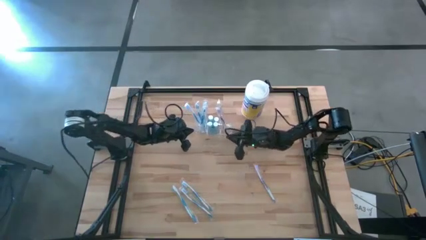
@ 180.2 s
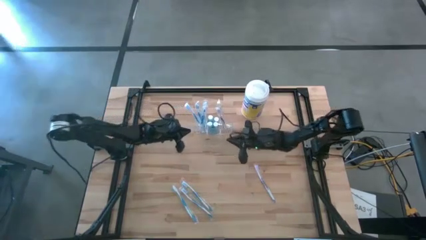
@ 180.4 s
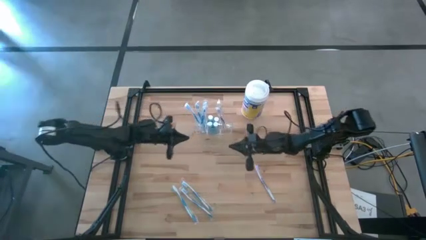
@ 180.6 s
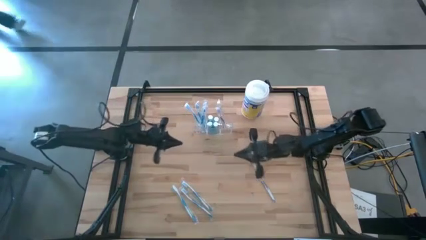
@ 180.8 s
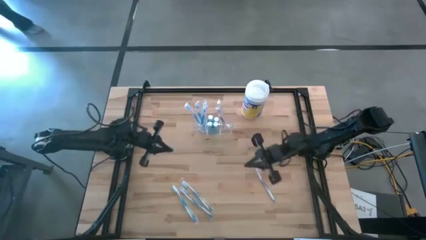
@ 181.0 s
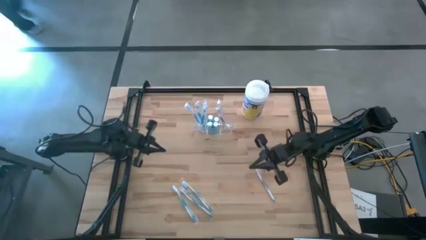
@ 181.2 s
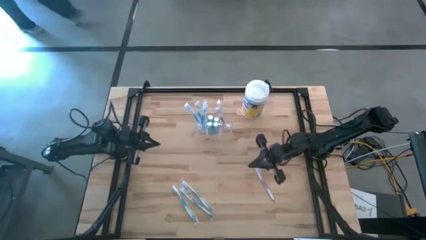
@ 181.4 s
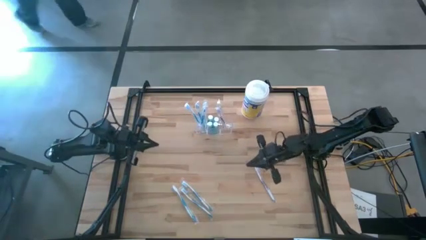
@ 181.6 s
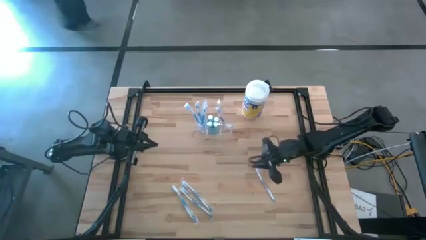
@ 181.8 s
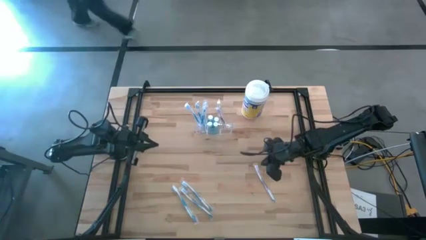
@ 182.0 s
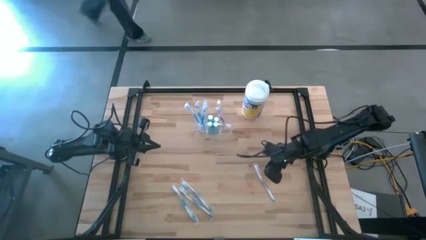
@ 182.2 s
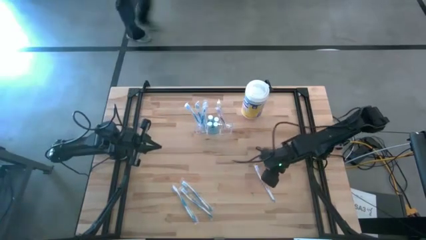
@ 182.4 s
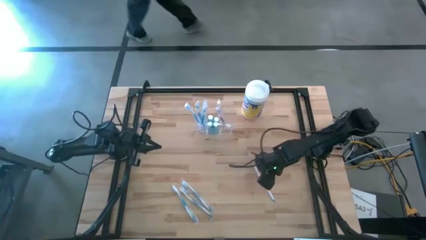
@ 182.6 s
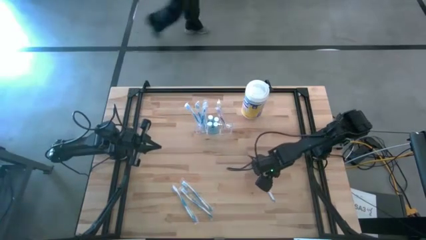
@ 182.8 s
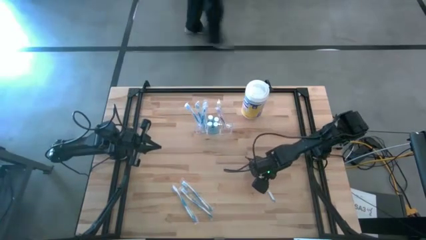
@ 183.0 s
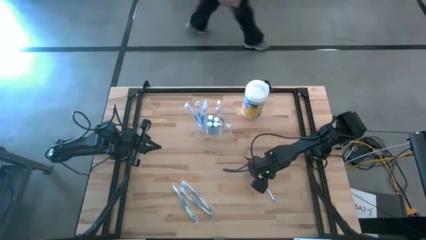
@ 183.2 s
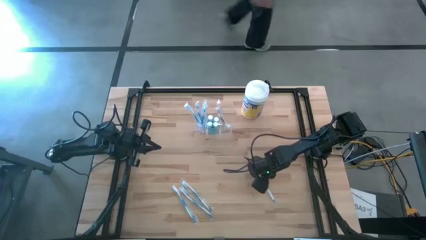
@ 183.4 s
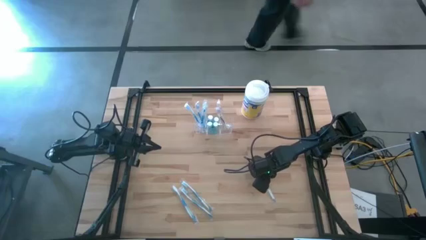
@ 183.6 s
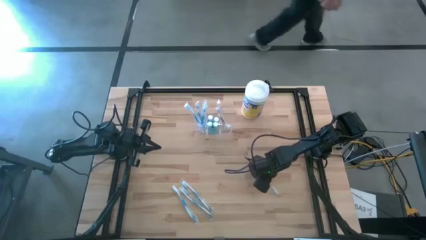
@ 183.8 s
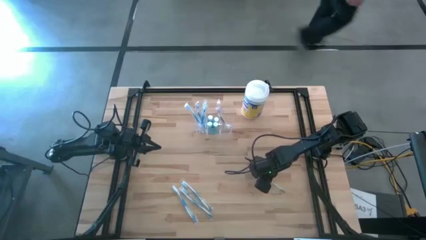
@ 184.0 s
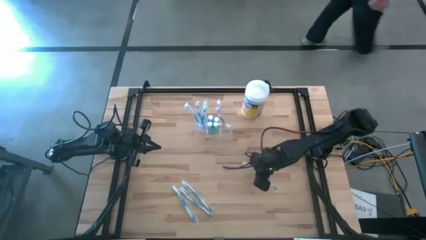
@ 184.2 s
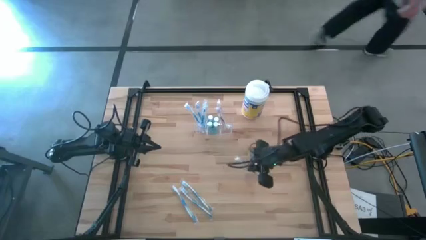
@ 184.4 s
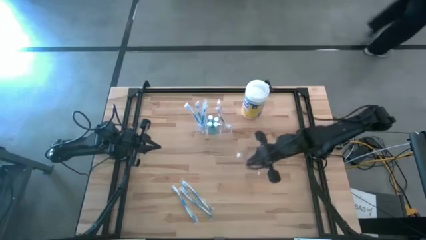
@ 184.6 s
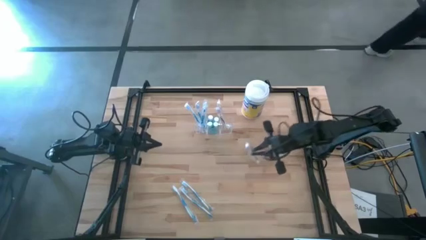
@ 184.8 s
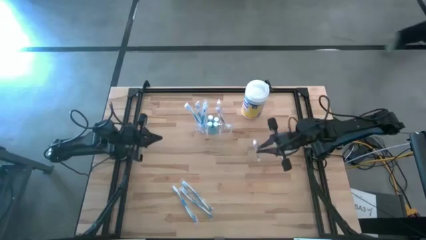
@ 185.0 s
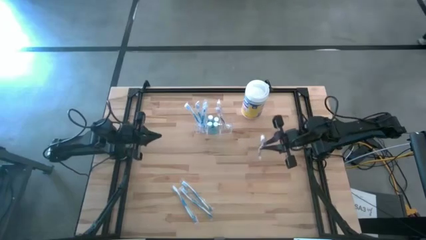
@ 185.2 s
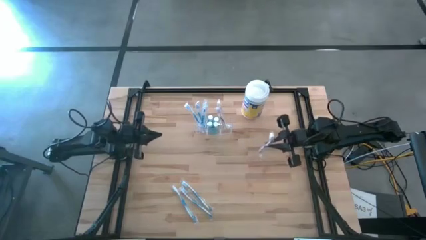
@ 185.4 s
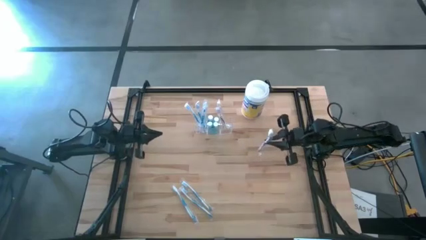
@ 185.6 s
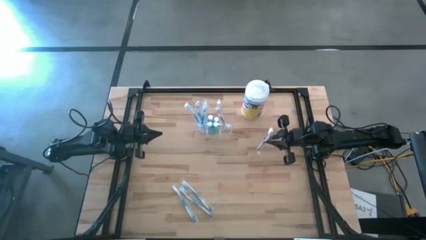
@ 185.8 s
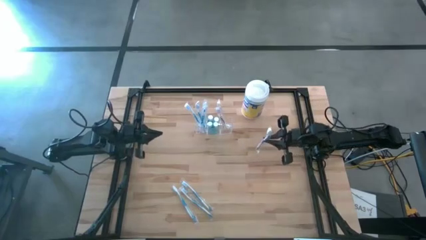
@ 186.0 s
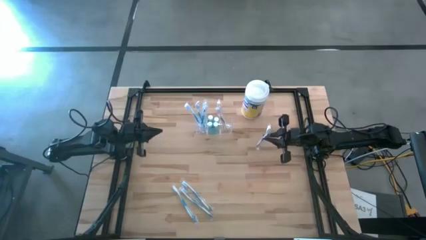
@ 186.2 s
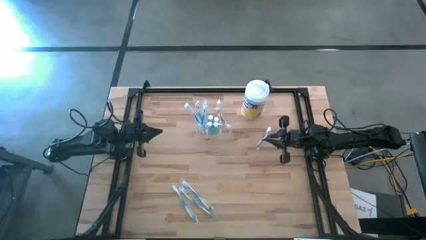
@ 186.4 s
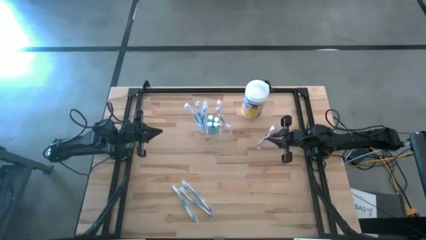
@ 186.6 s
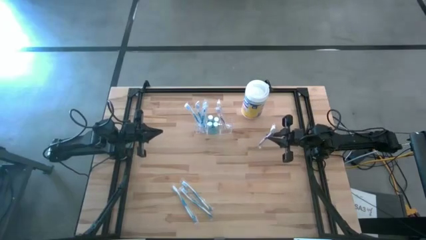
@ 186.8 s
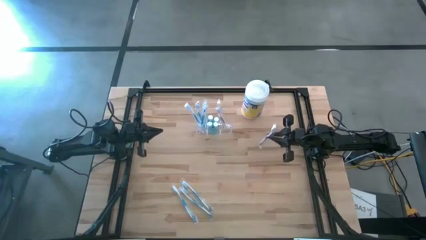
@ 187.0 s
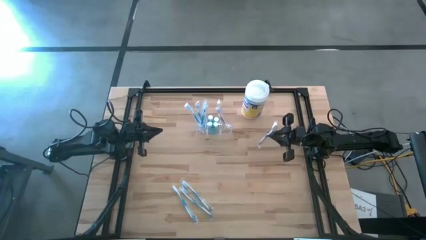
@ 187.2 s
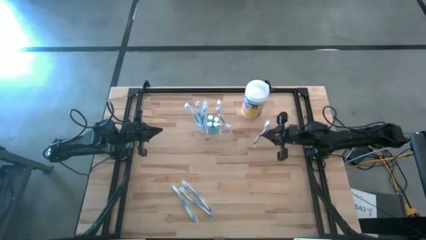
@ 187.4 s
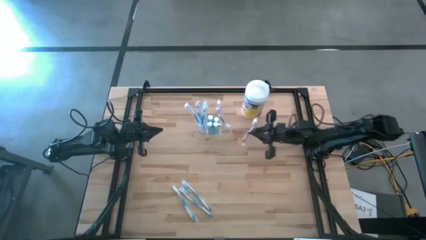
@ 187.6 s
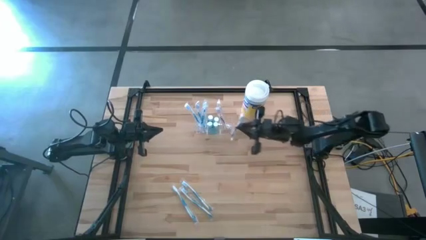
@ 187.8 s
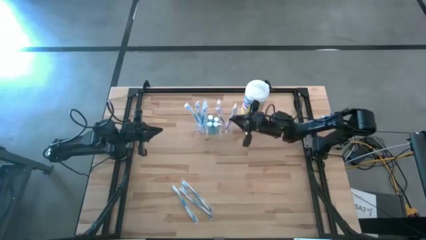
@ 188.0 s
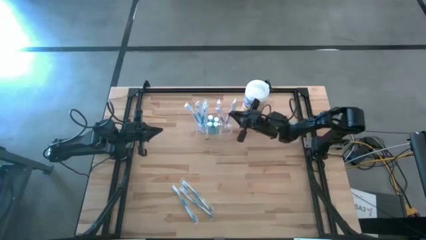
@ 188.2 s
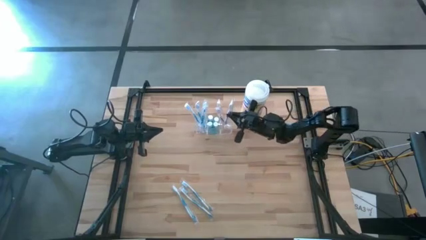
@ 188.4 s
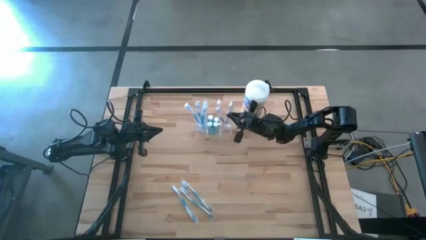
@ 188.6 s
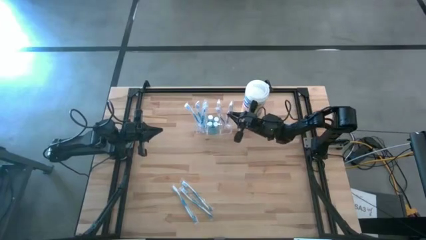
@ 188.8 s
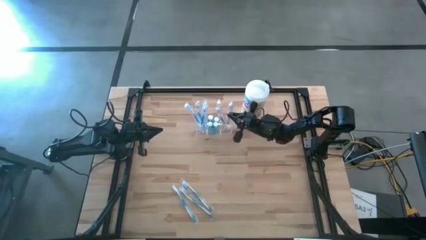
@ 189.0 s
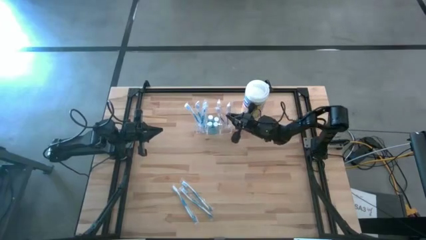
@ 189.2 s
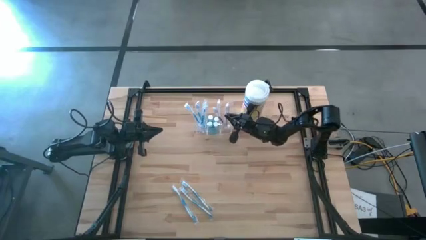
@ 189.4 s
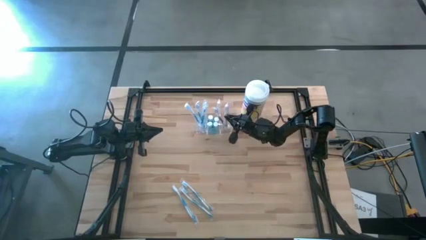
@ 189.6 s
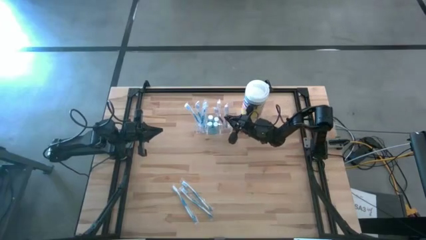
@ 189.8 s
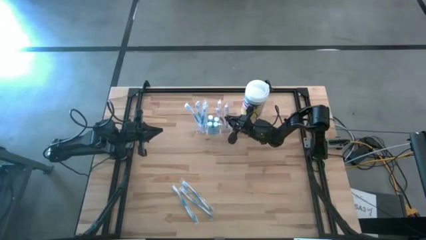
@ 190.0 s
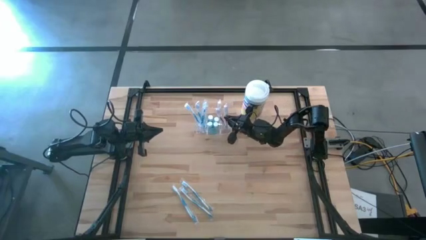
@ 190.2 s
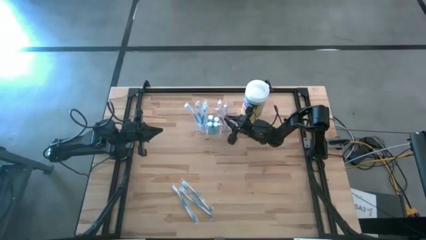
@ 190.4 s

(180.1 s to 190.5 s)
Task: Pick & Place toothbrushing station
Put the purple toothbrush into the transparent organizer
